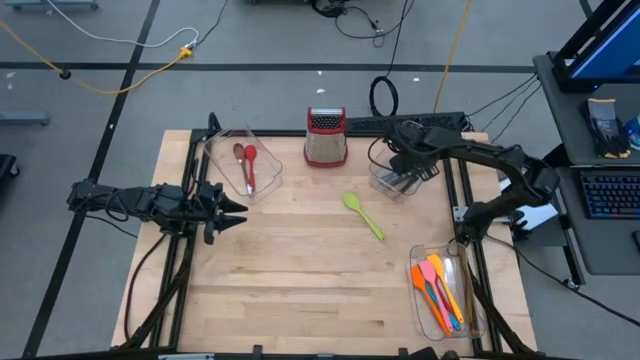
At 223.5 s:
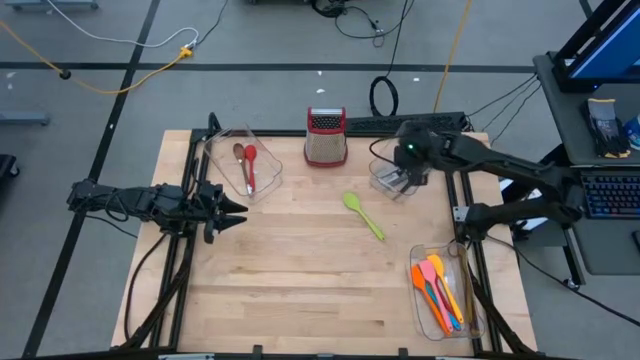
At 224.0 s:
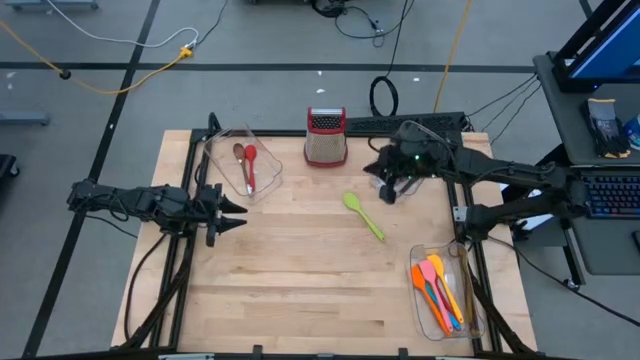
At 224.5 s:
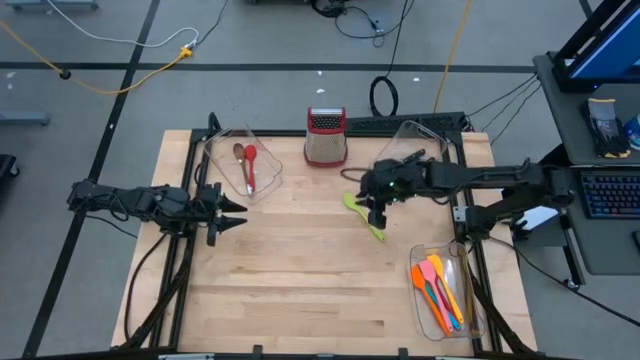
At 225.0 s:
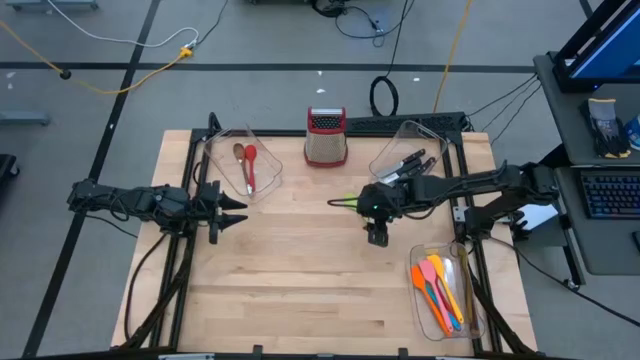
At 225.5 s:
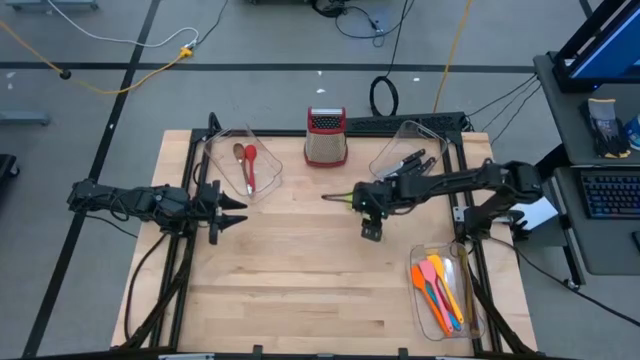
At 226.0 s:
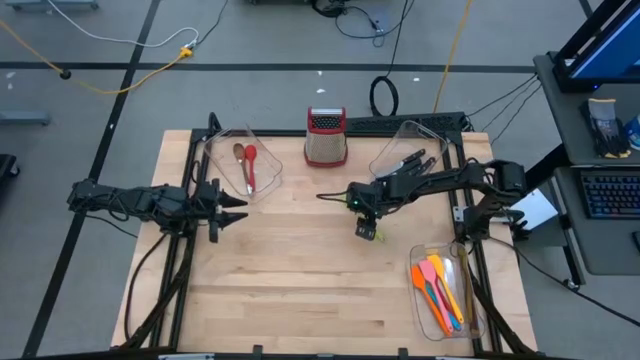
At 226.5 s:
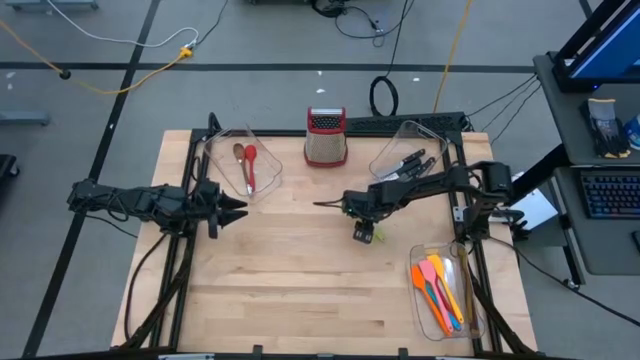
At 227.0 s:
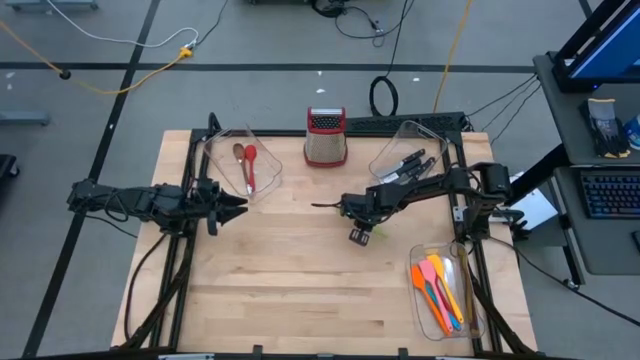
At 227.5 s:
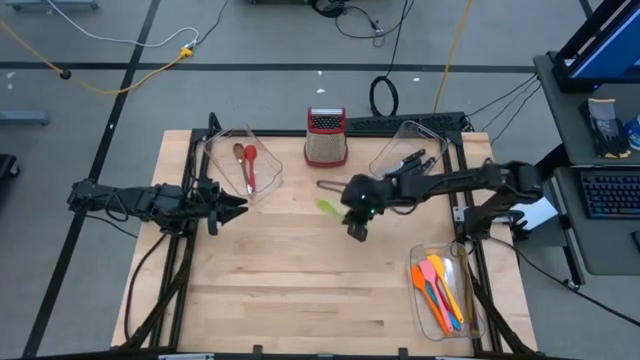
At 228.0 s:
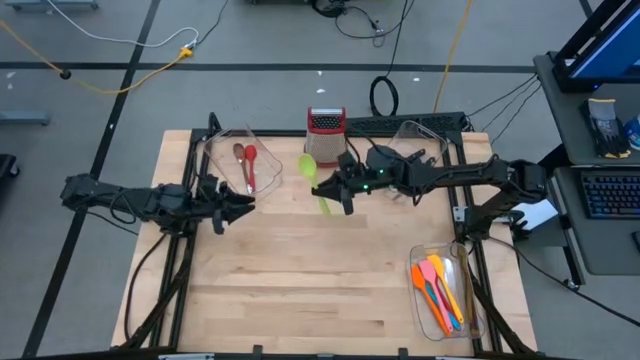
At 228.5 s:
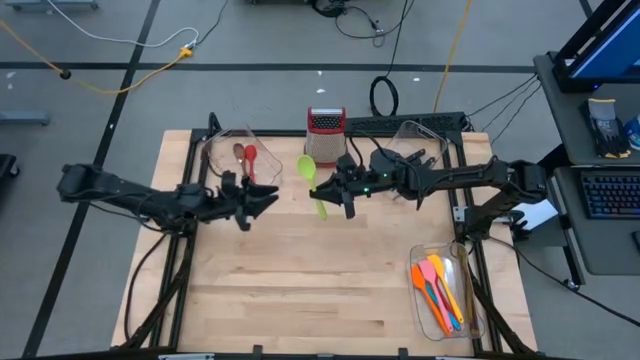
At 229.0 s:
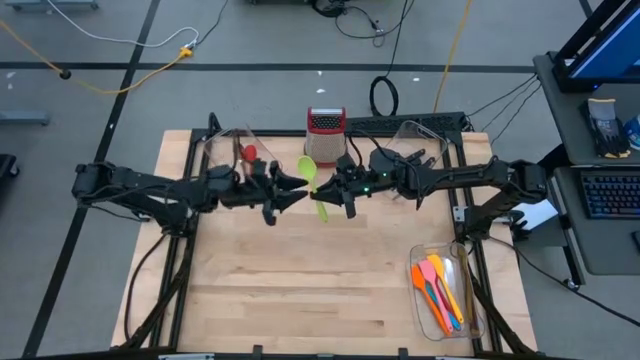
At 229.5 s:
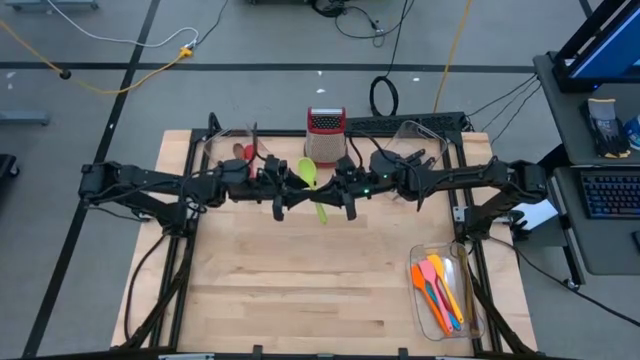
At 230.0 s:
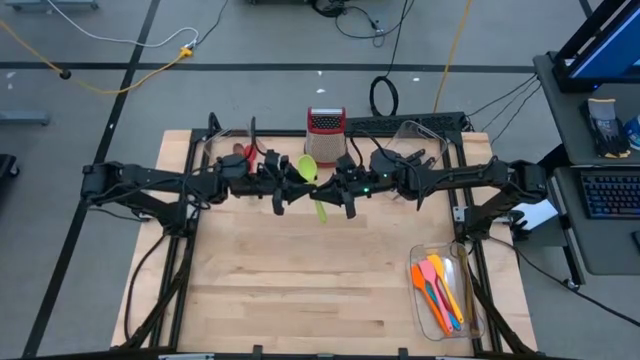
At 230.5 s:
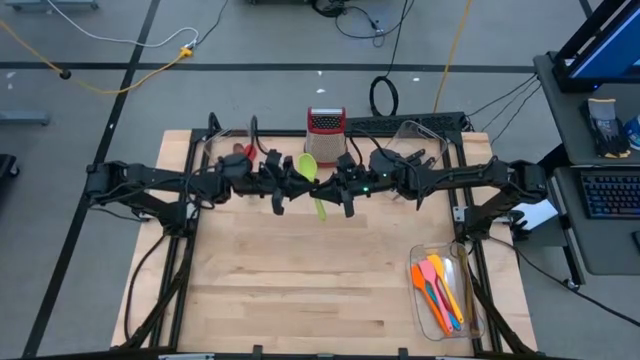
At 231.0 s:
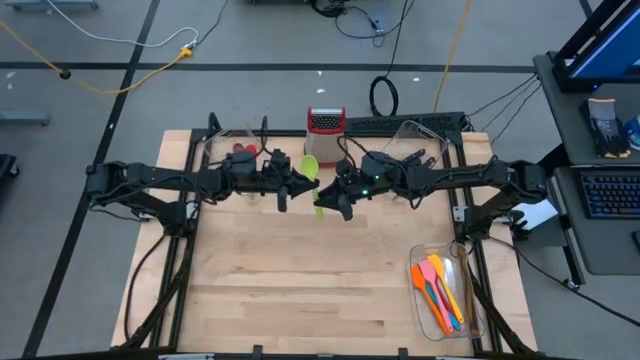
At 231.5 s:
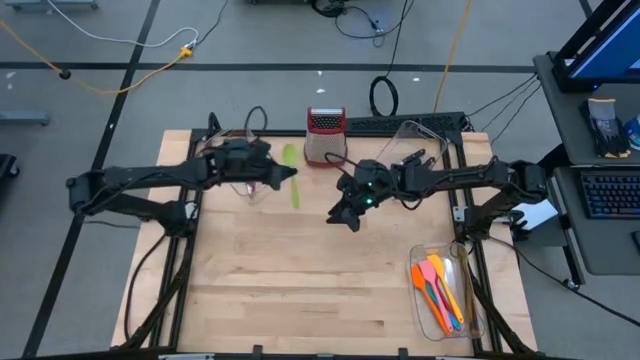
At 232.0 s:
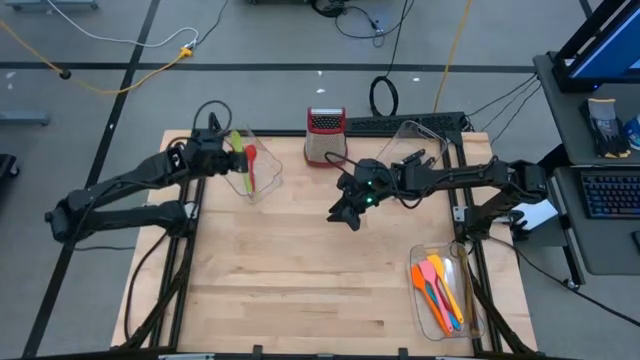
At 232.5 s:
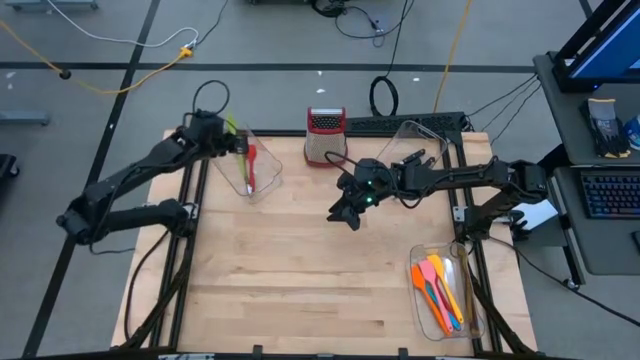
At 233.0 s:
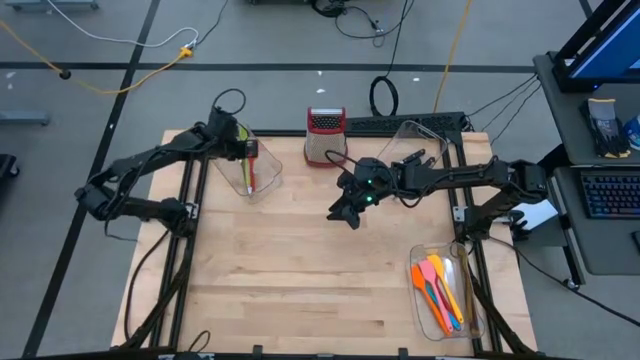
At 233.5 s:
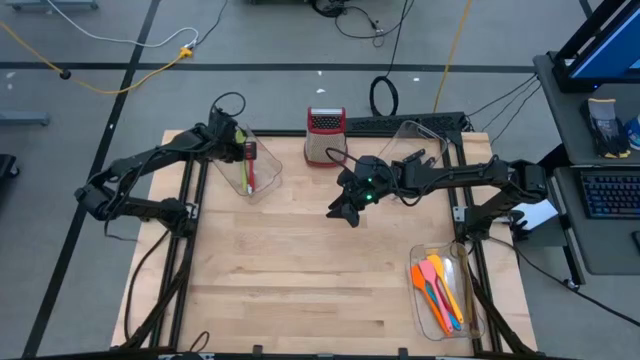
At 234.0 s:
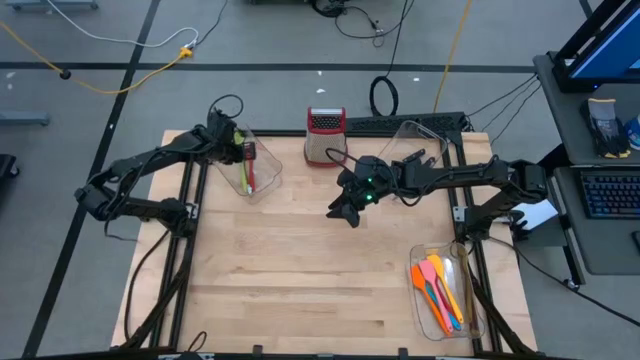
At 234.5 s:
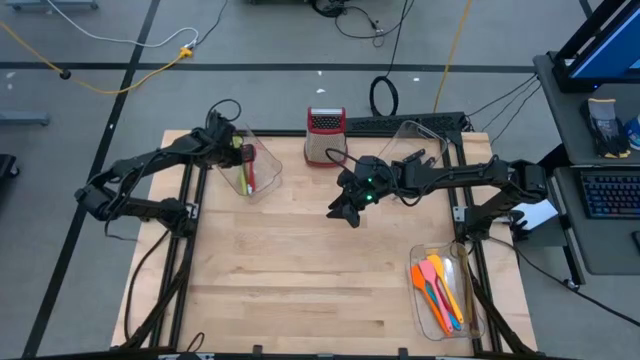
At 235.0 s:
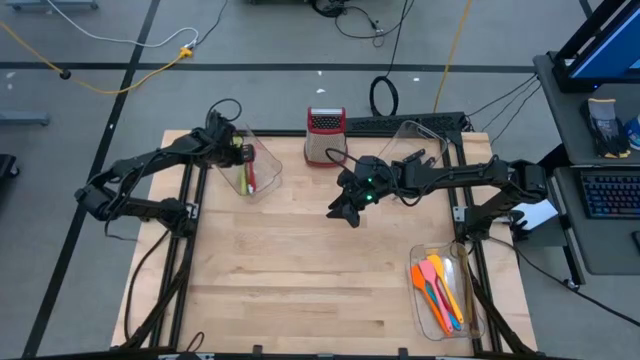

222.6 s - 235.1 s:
Task: Pick & Place Kitchen Items
Put the light green serving spoon into the top left transparent bin

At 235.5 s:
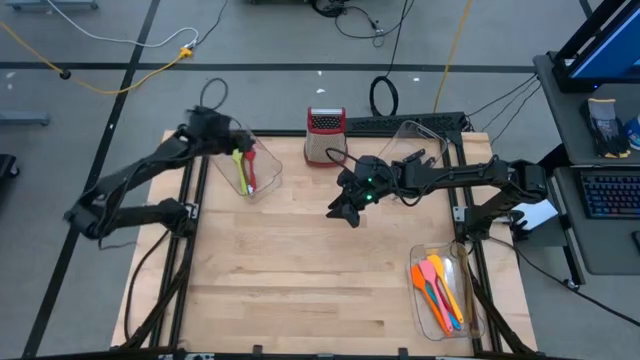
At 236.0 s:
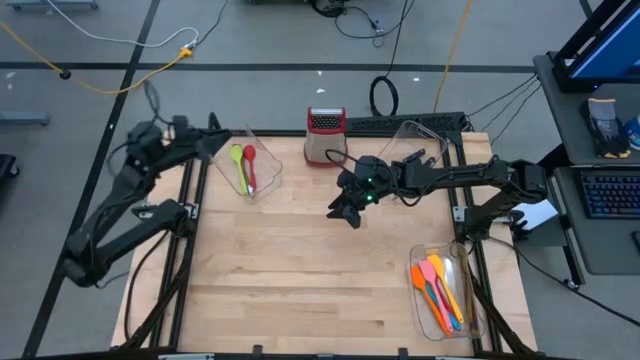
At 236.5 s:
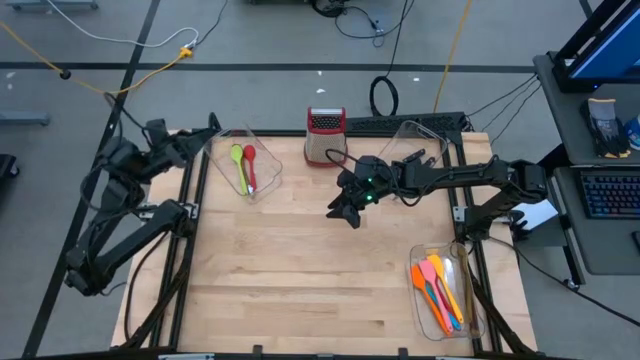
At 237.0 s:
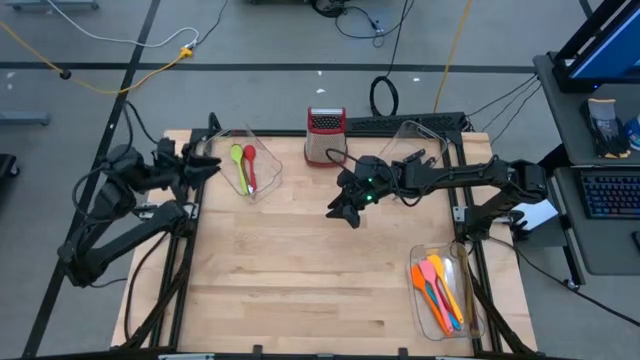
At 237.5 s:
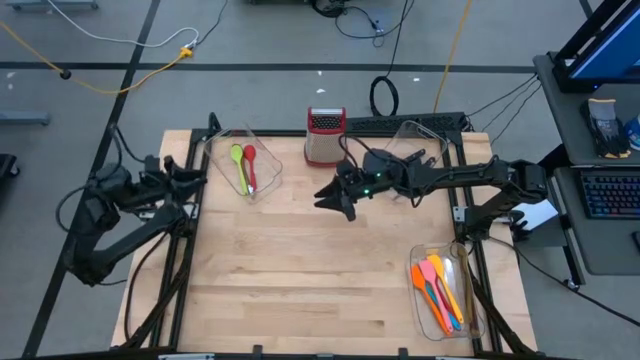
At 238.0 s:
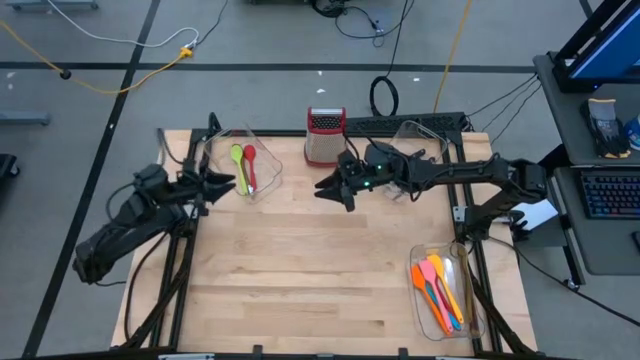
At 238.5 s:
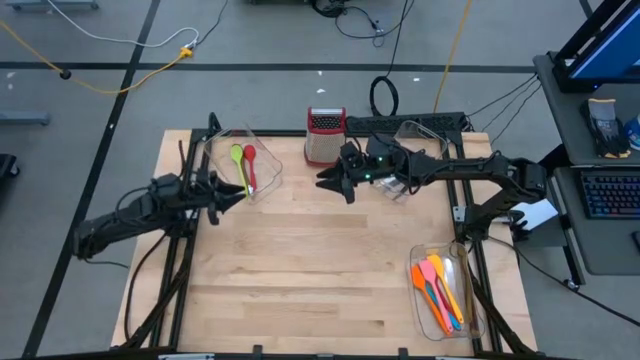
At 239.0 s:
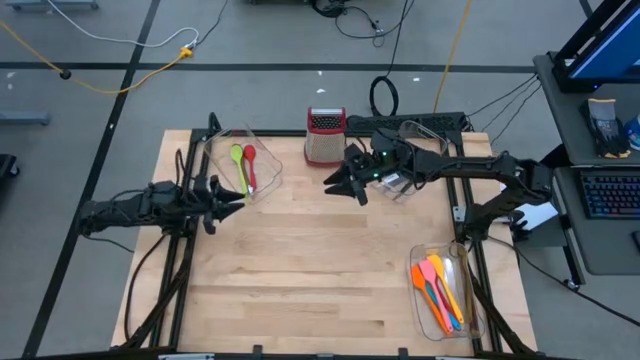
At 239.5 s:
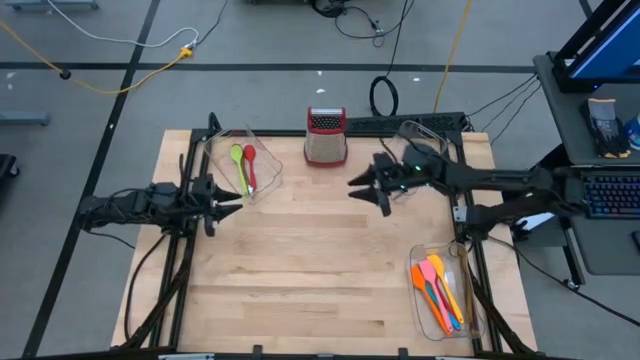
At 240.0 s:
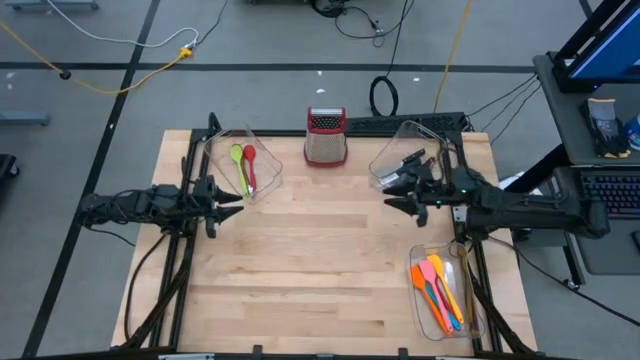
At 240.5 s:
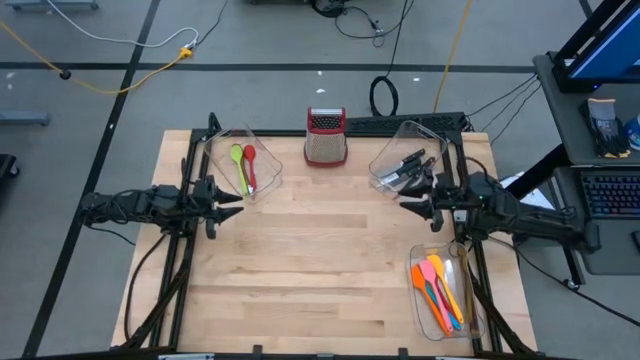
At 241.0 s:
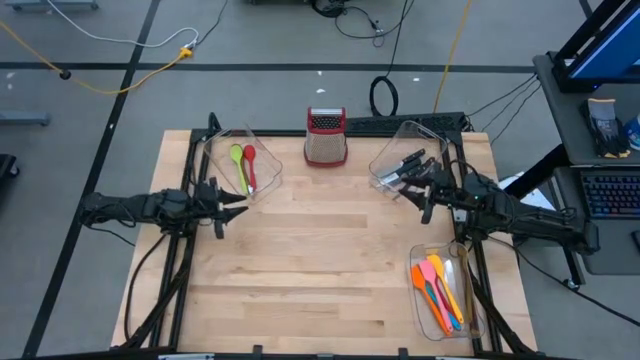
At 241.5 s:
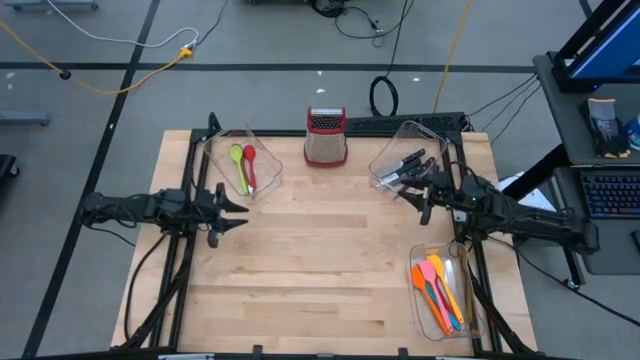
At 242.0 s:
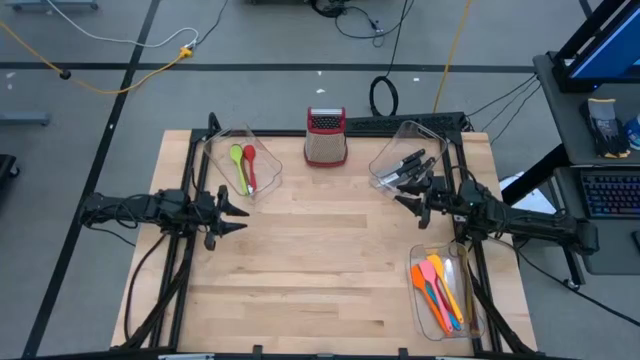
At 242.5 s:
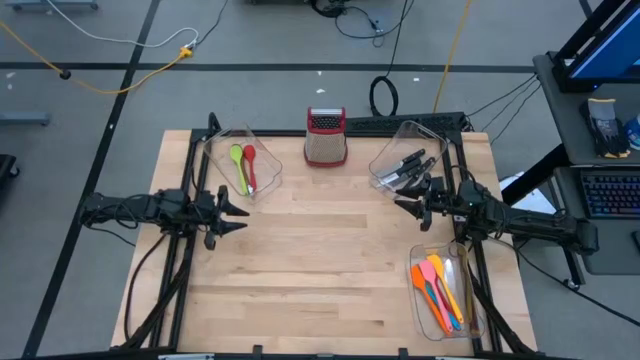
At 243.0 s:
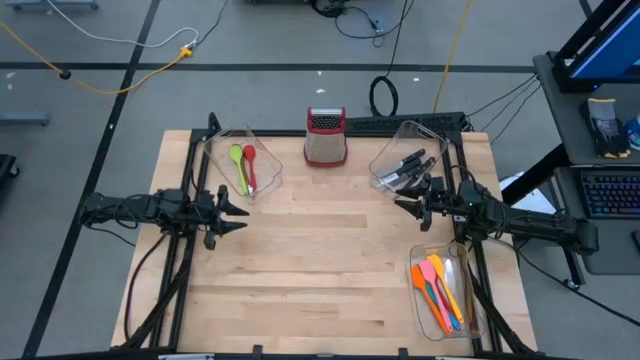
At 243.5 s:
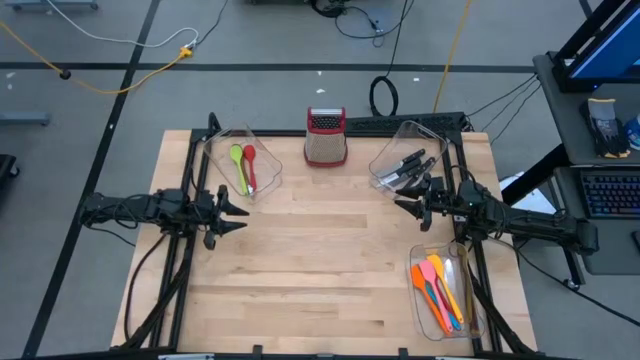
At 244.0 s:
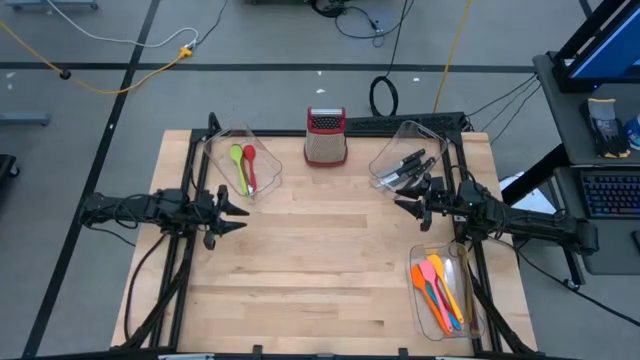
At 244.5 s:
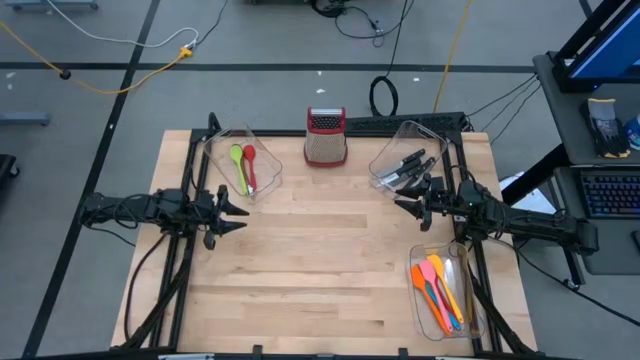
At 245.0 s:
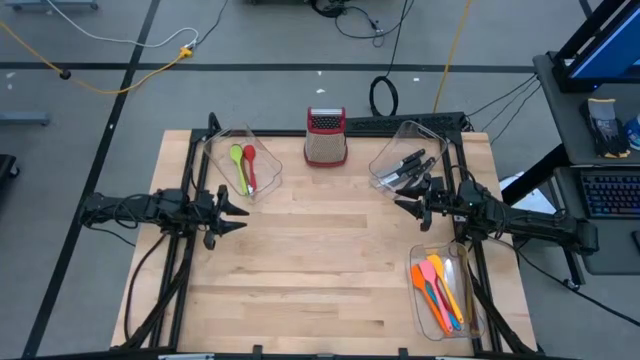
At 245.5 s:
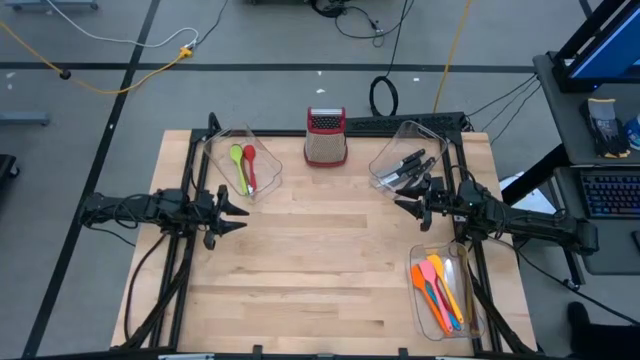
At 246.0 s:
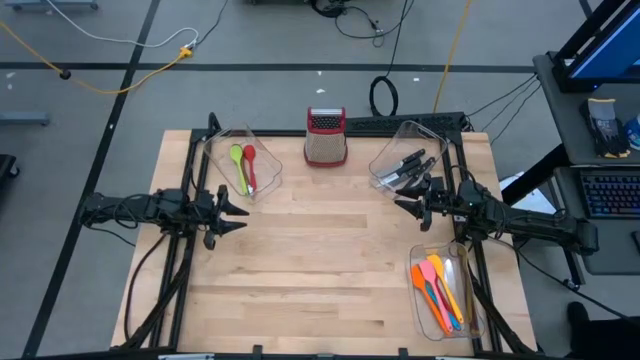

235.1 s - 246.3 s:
Return to Home Position
